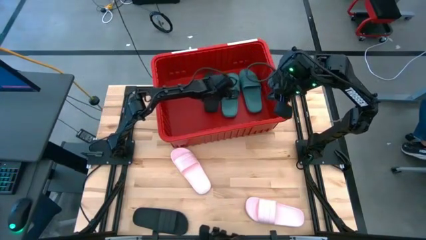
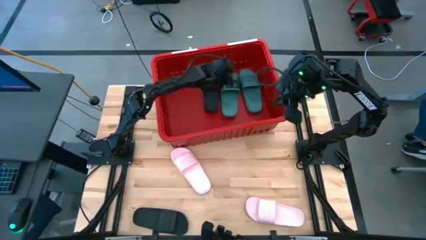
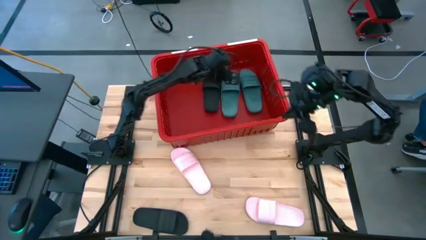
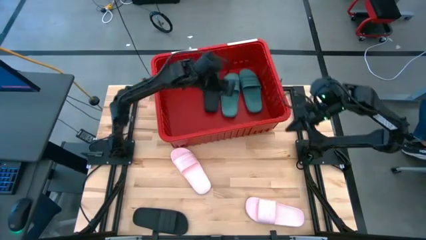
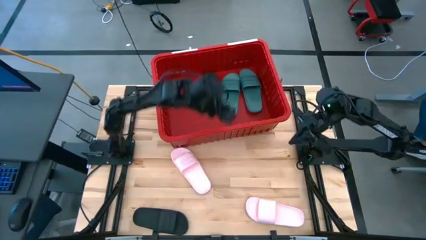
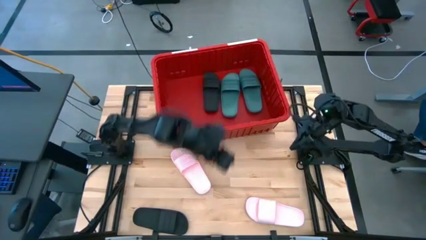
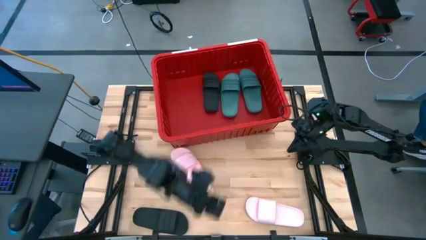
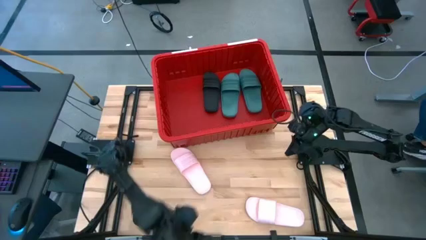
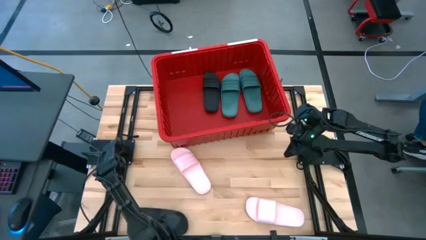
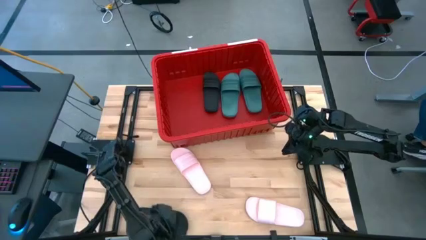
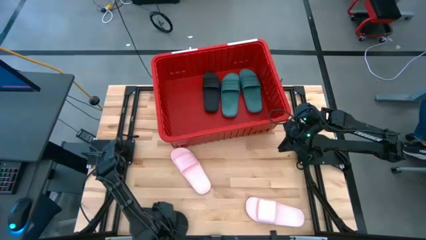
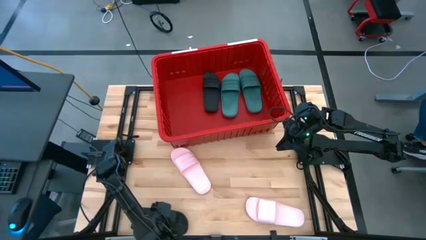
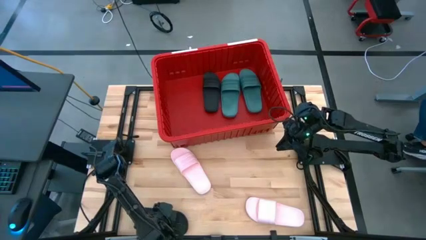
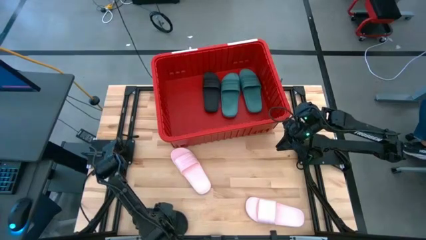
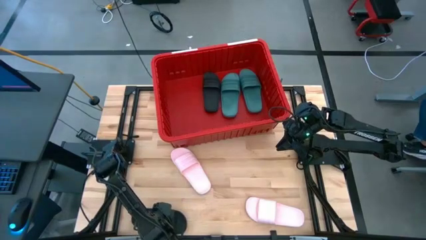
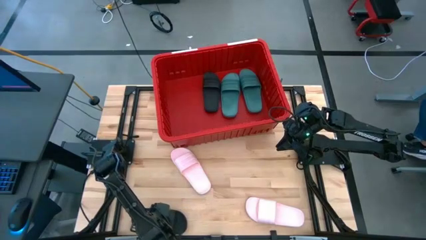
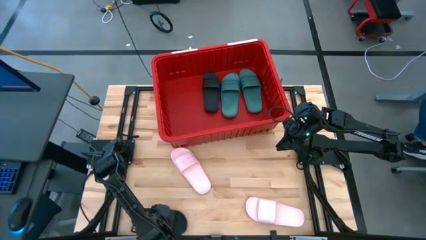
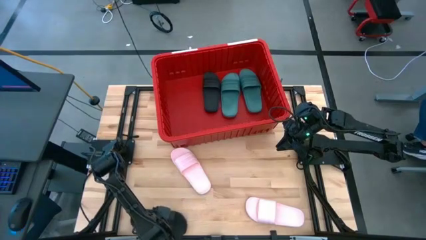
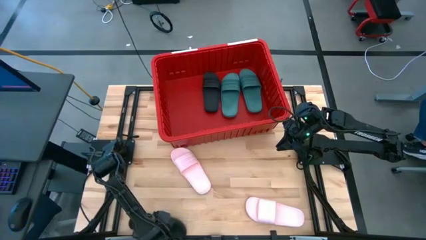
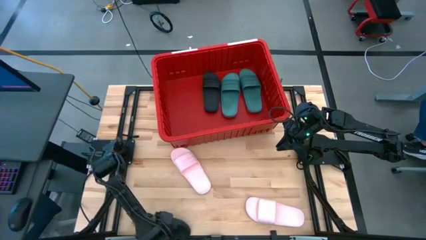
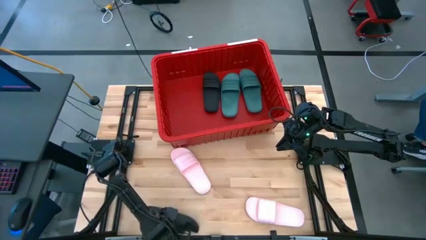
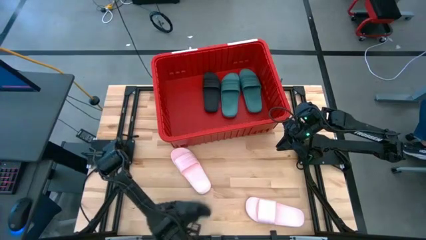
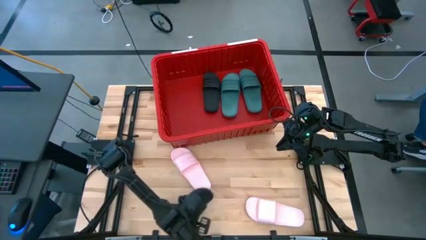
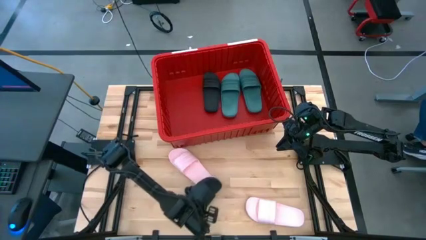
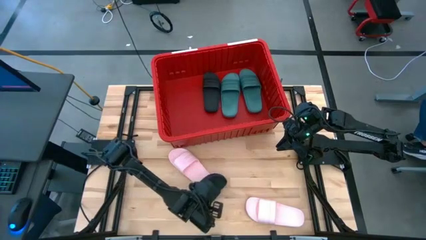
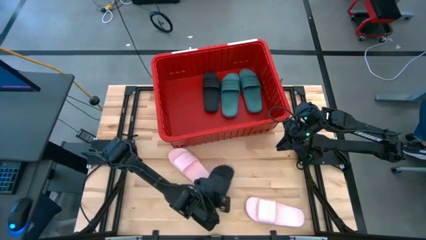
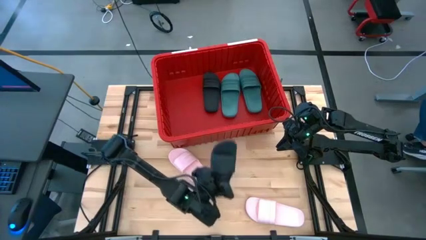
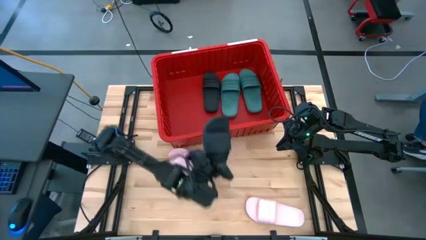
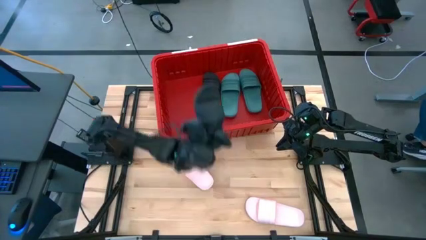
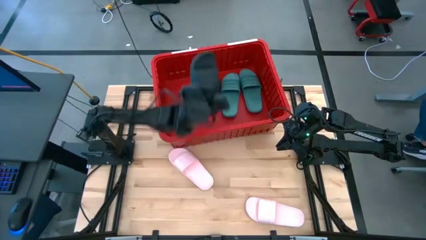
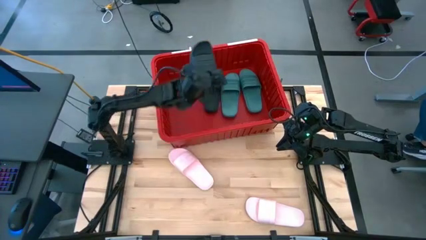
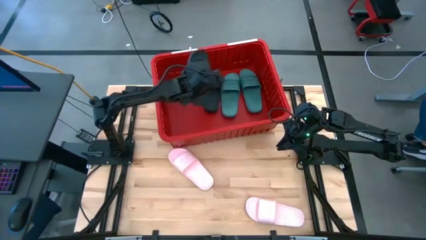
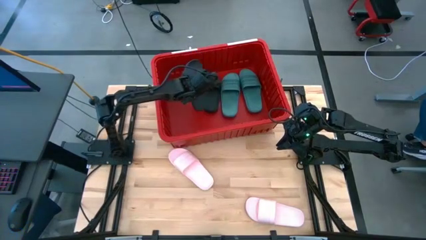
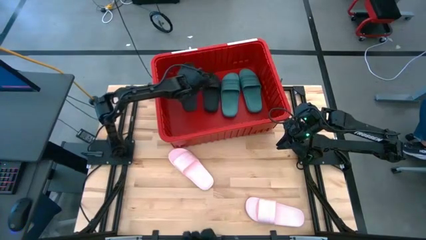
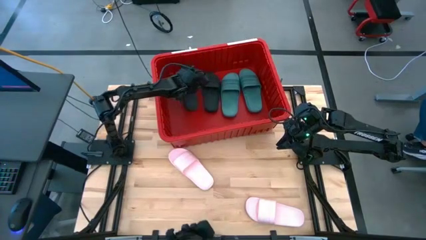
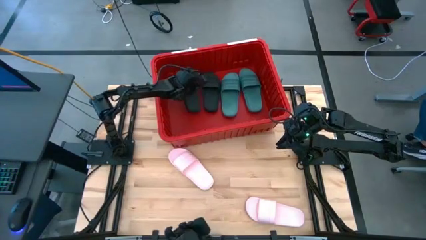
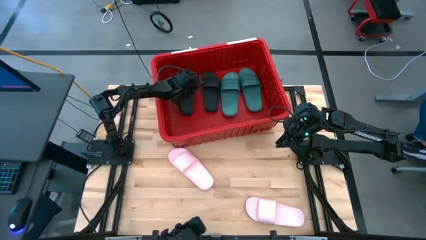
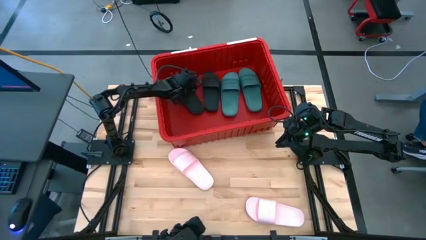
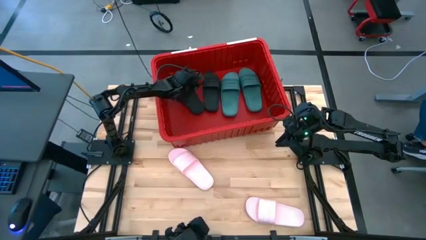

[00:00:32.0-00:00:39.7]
Task: Pick and place slides into bin
Put the black slide into the red bin

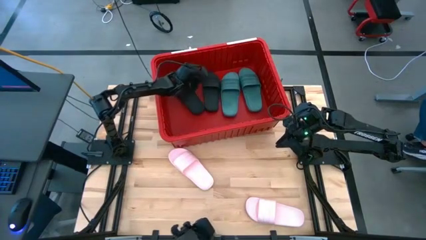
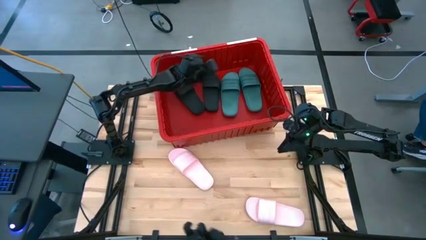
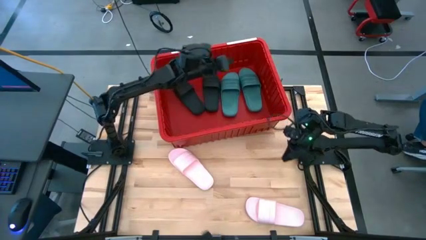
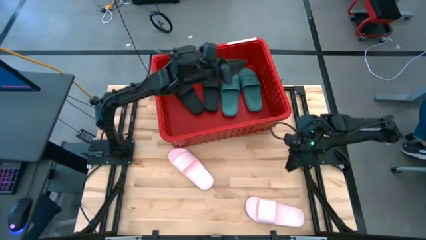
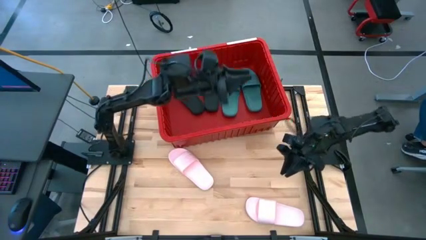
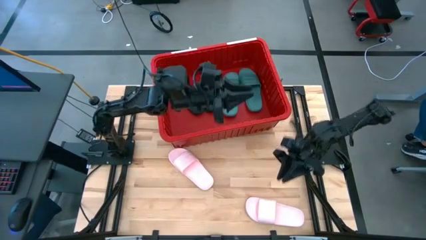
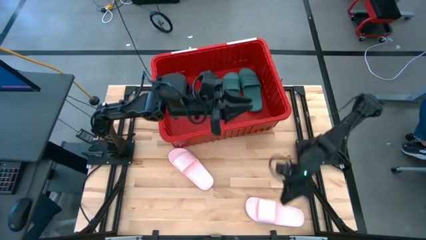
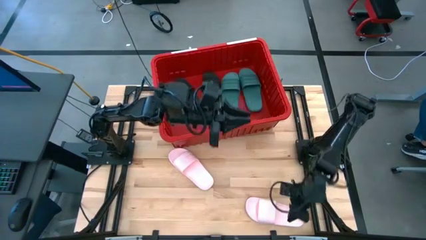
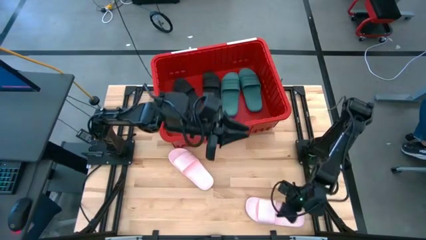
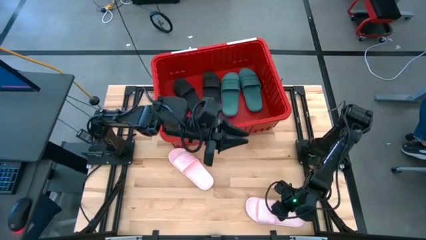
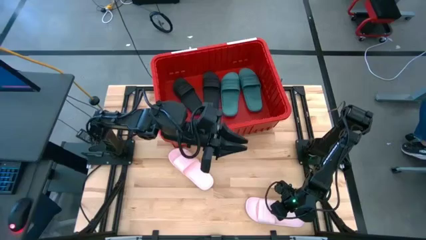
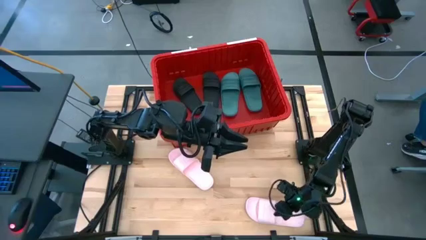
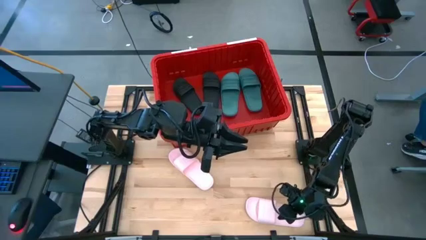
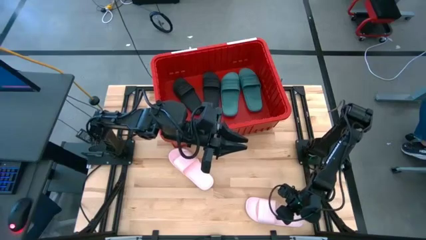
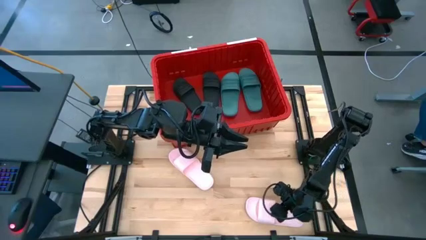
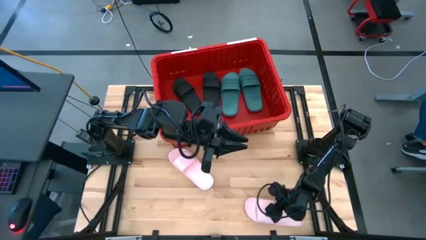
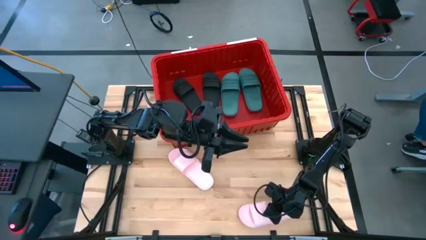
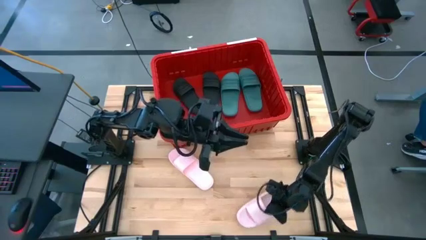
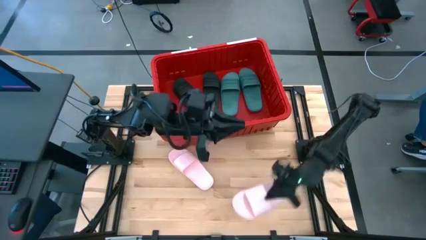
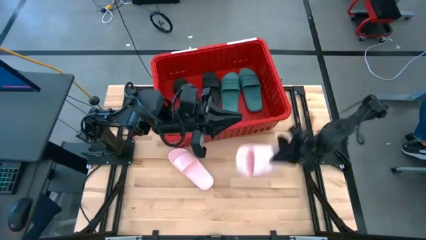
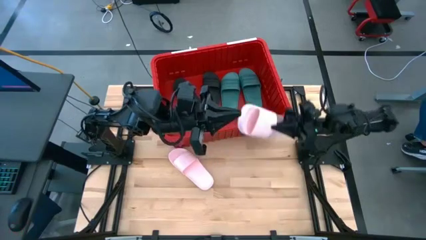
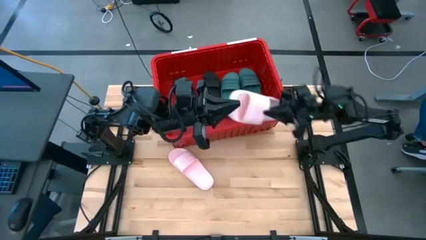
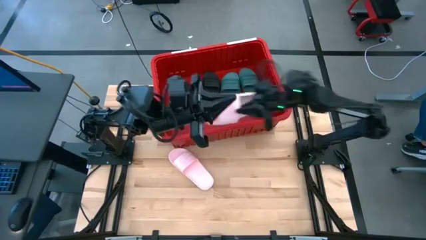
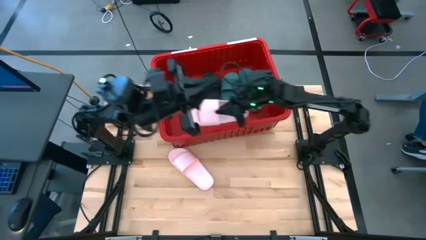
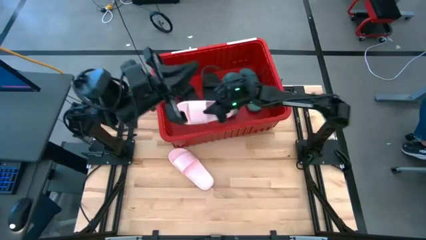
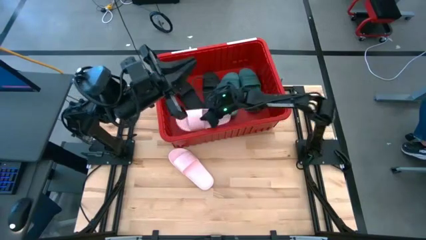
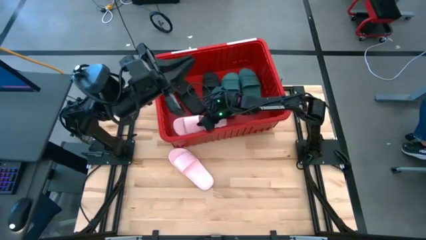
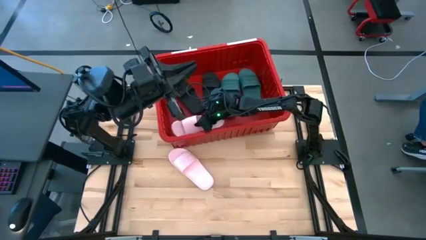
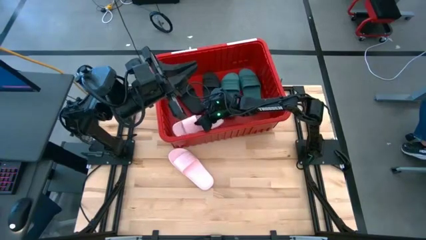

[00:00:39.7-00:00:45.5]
Put the right pink slide into the red bin

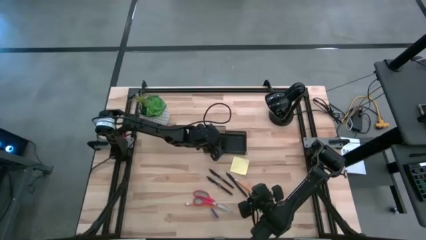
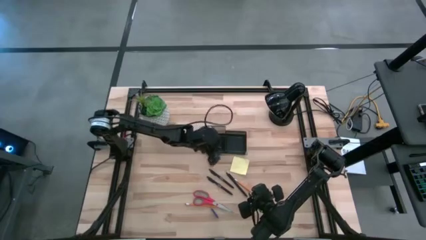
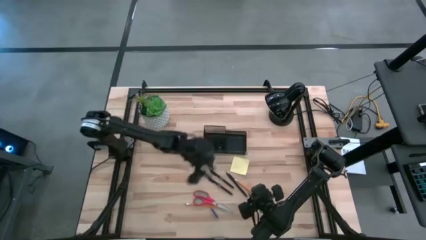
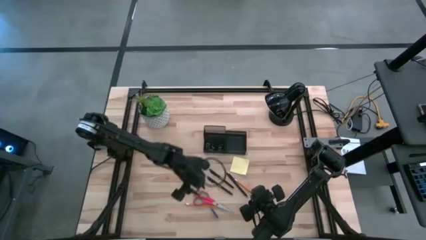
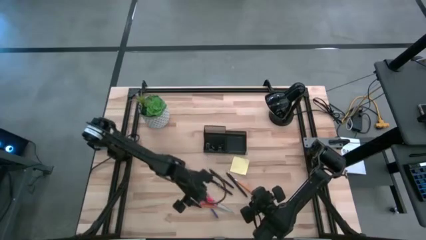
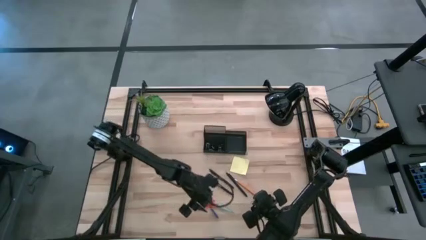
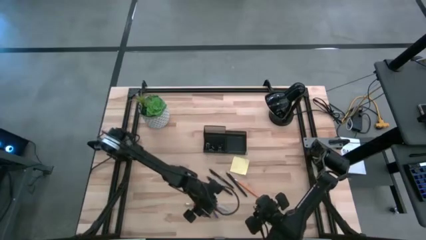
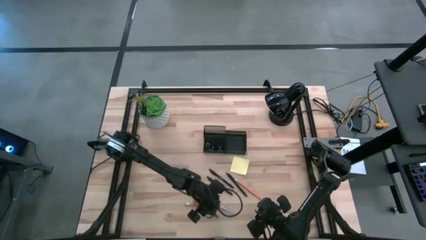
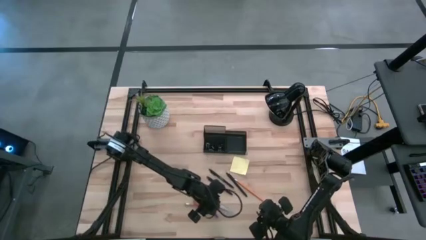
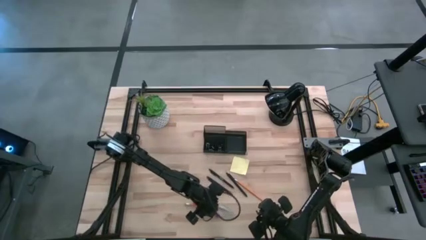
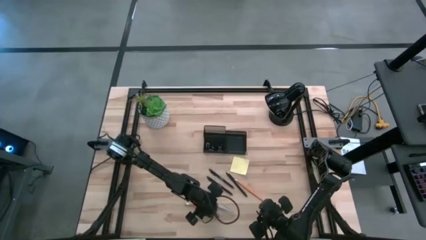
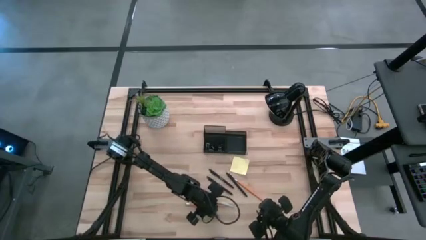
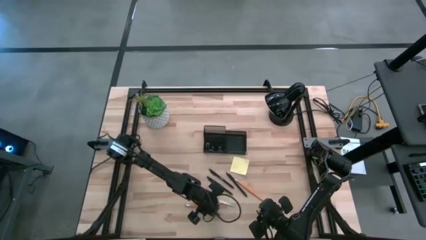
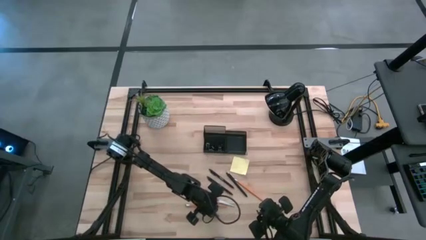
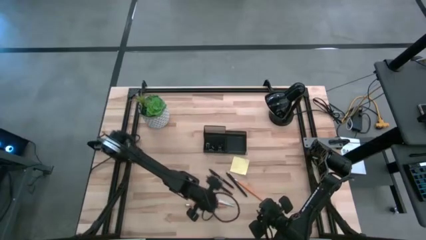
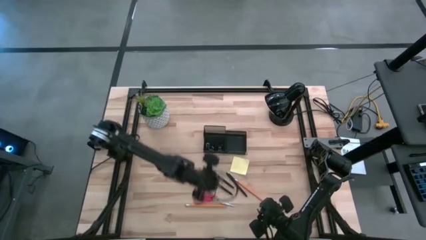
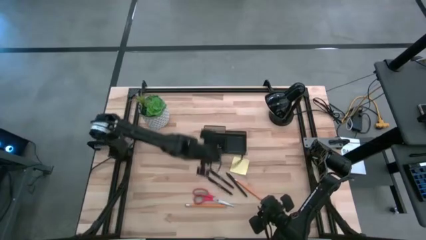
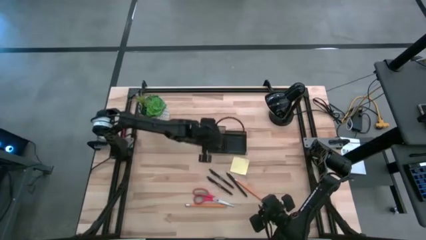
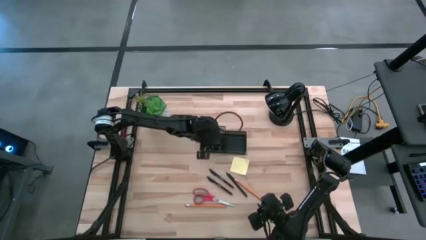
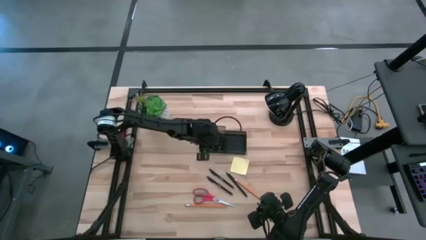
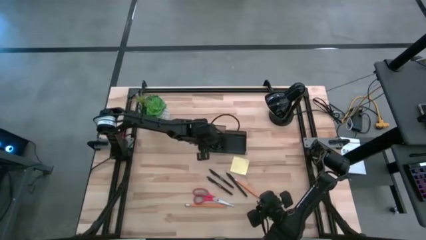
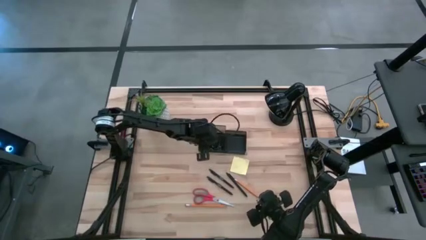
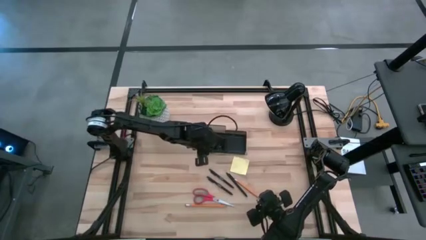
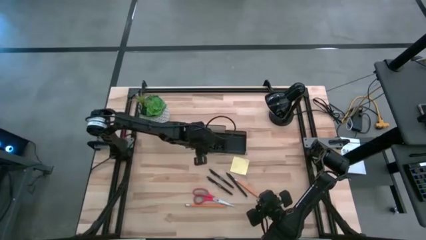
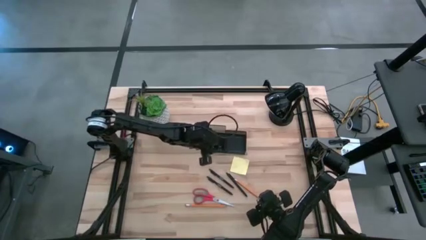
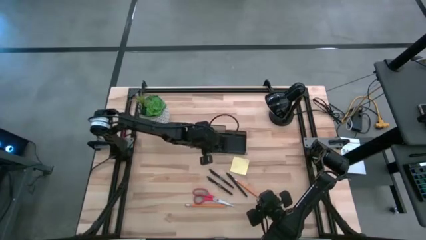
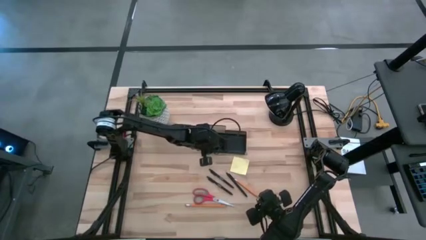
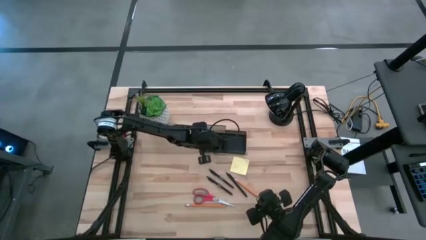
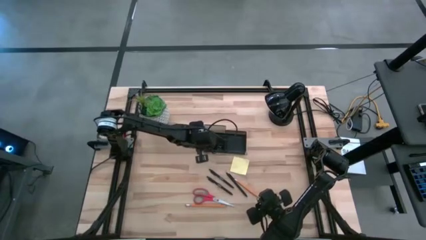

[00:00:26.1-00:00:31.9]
Task: Pick and place office supplies into organizer
Put the blue eraser into the black desk organizer
